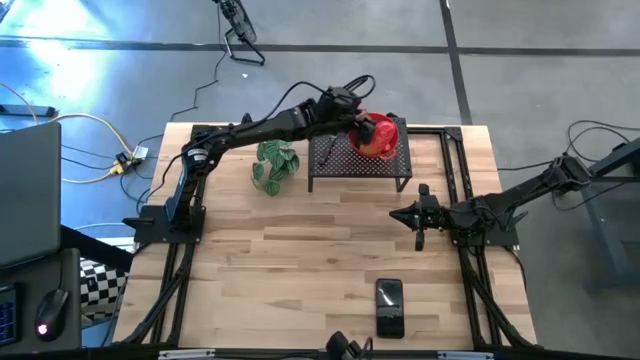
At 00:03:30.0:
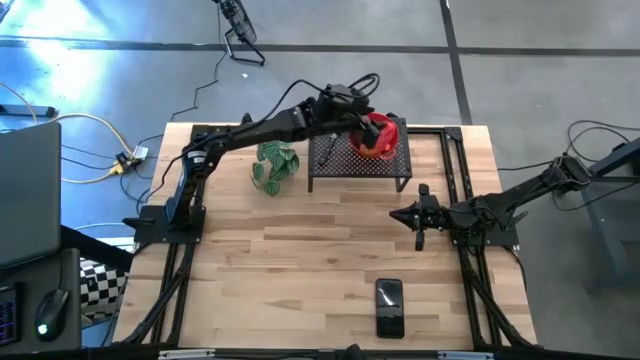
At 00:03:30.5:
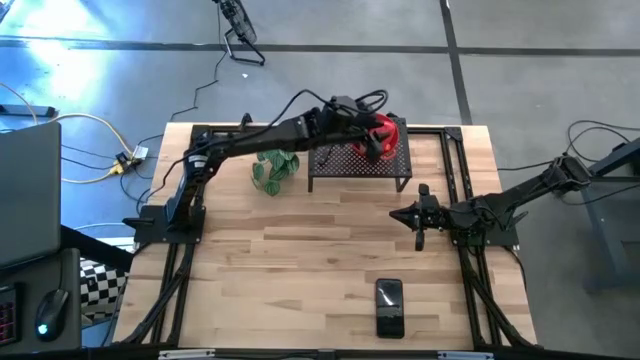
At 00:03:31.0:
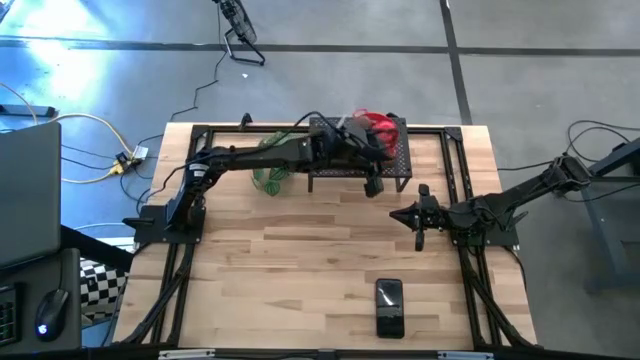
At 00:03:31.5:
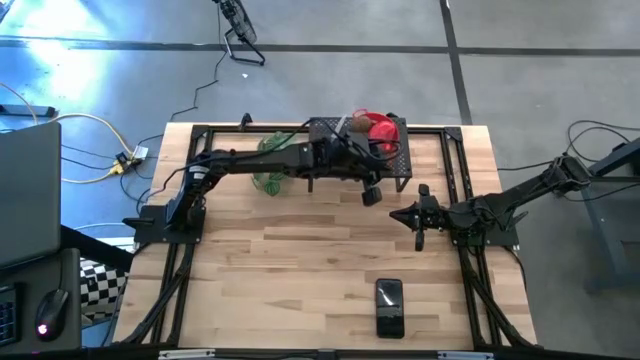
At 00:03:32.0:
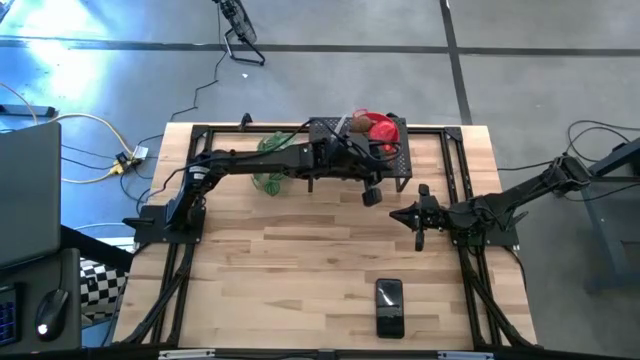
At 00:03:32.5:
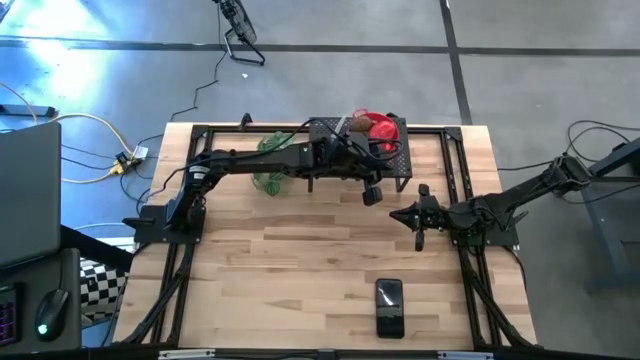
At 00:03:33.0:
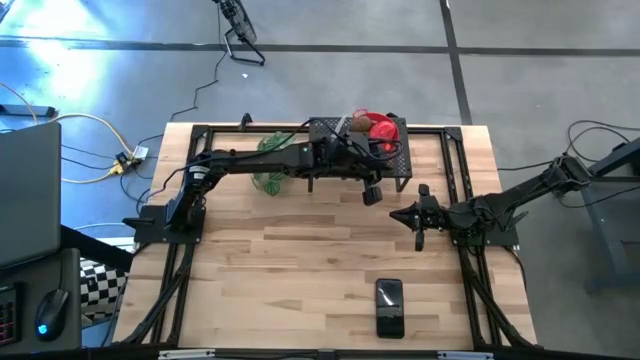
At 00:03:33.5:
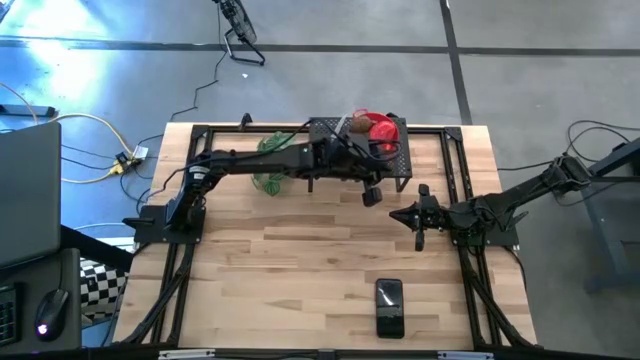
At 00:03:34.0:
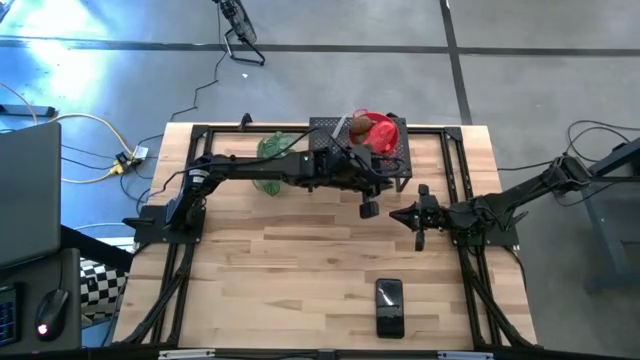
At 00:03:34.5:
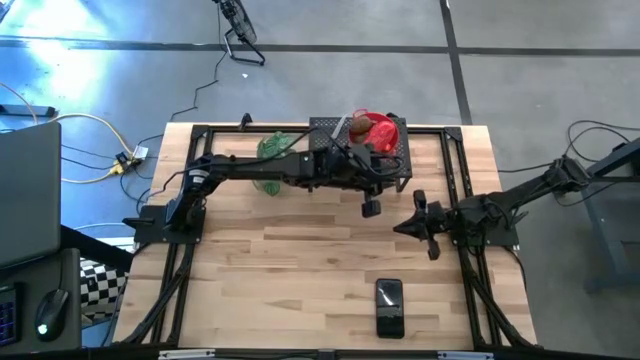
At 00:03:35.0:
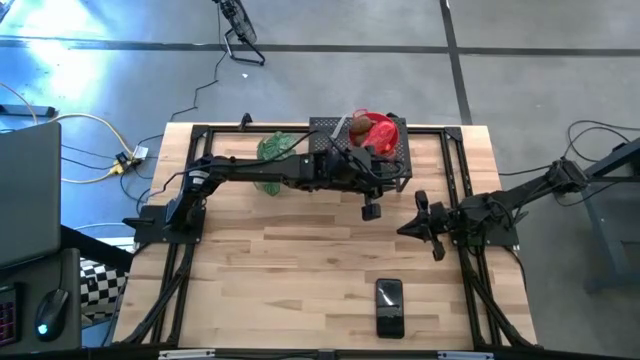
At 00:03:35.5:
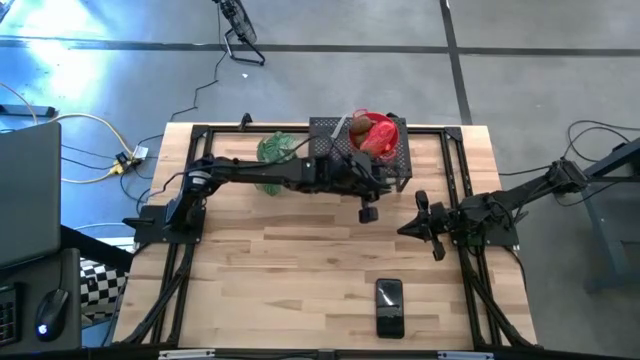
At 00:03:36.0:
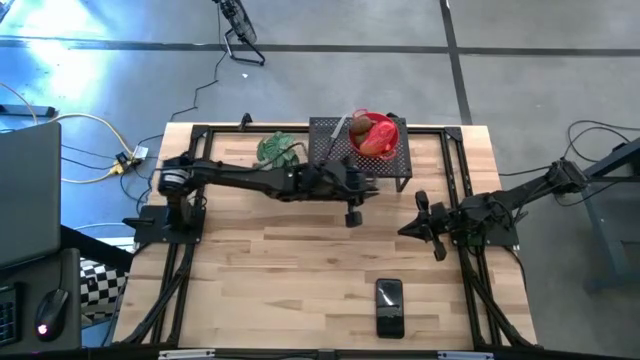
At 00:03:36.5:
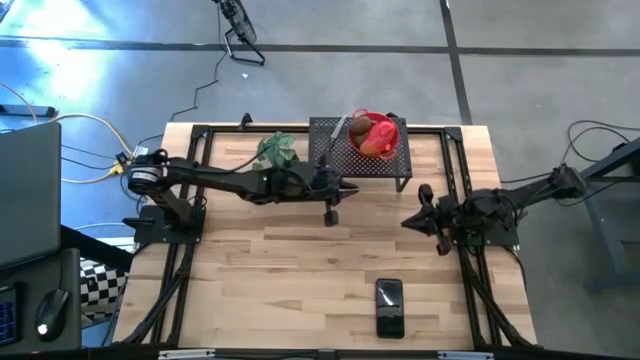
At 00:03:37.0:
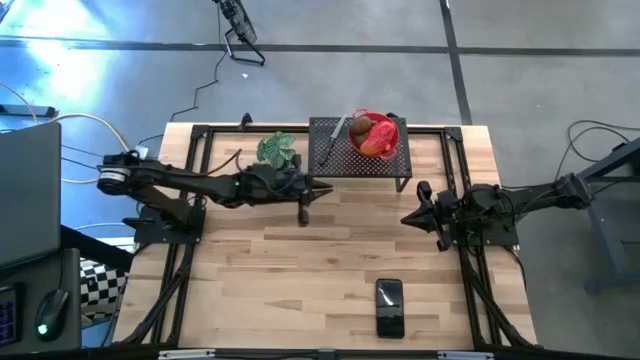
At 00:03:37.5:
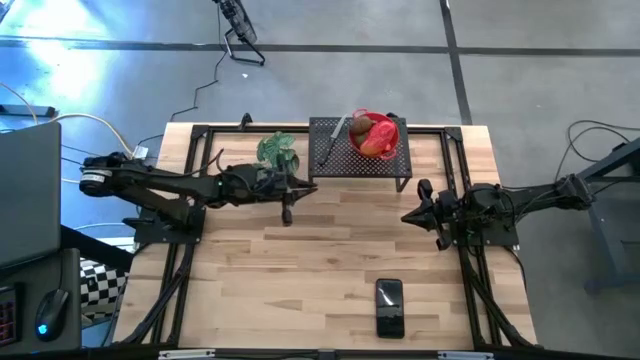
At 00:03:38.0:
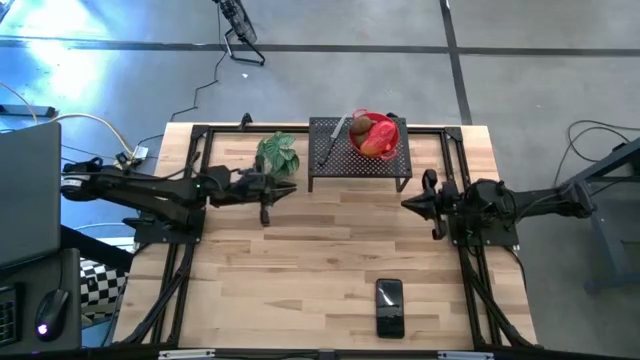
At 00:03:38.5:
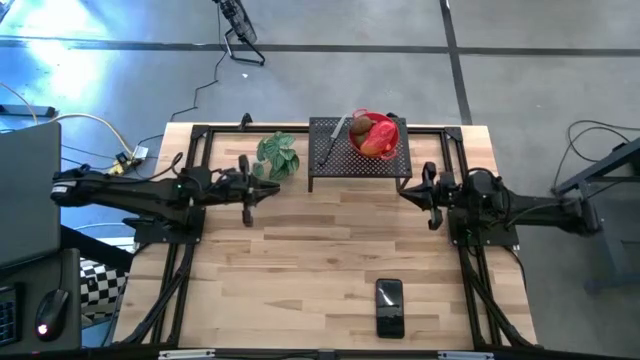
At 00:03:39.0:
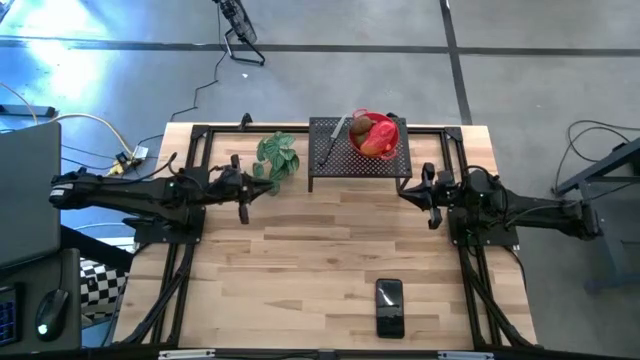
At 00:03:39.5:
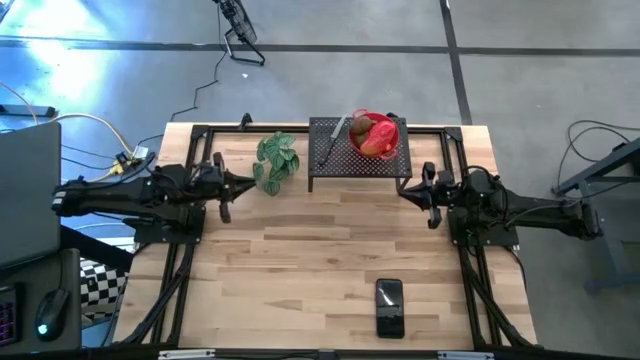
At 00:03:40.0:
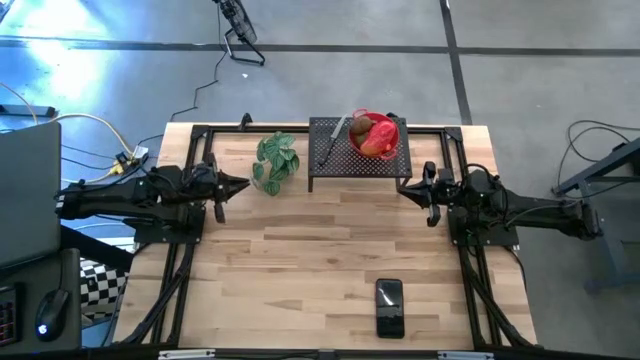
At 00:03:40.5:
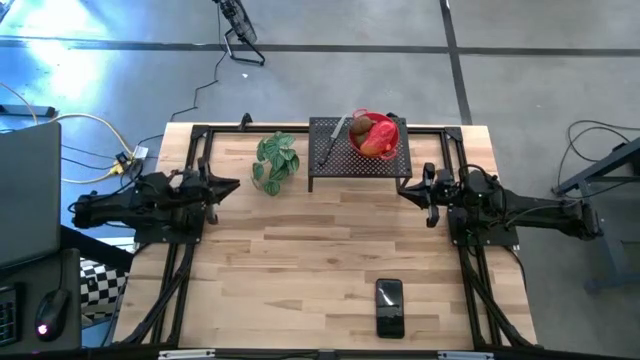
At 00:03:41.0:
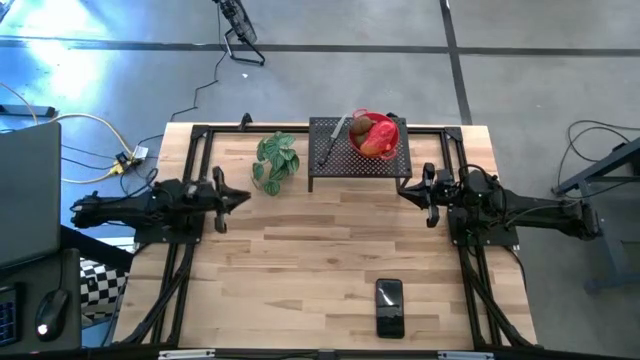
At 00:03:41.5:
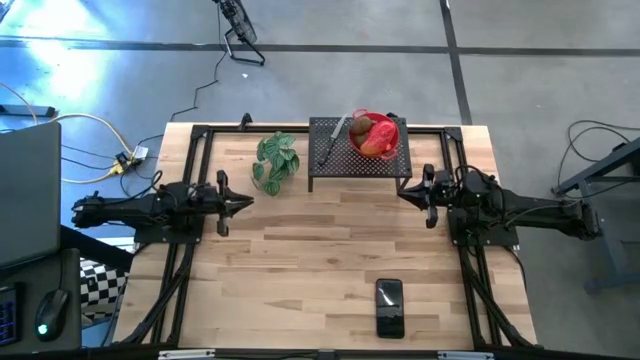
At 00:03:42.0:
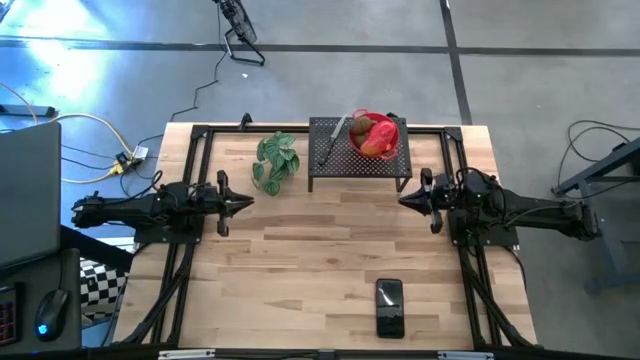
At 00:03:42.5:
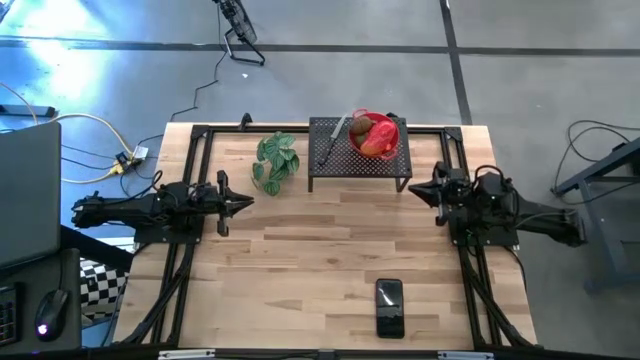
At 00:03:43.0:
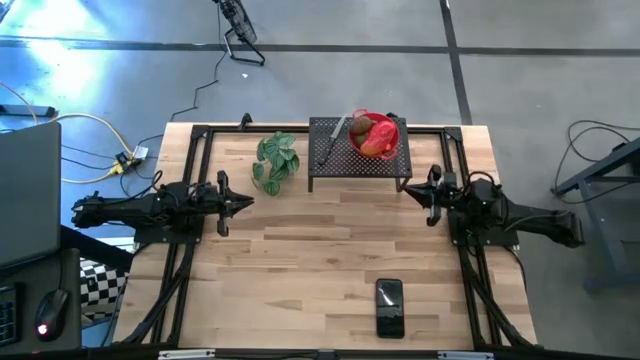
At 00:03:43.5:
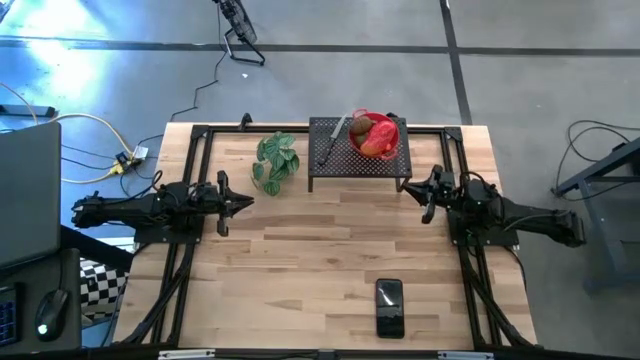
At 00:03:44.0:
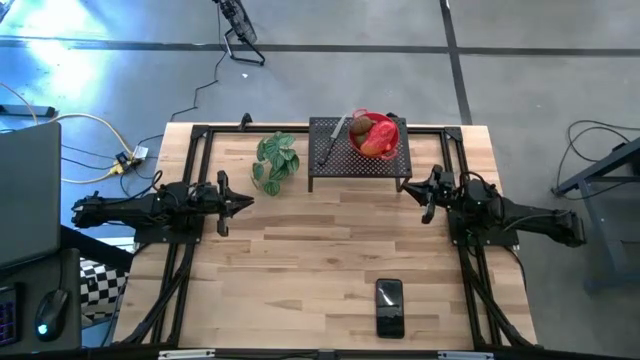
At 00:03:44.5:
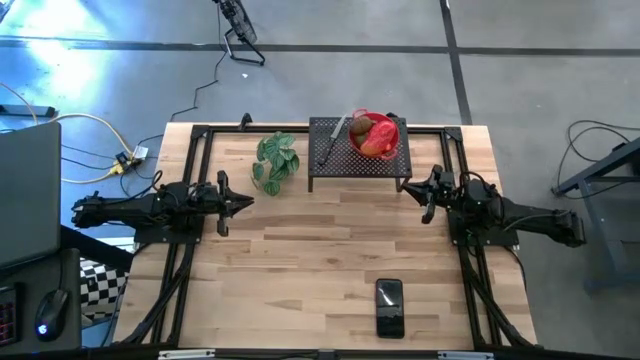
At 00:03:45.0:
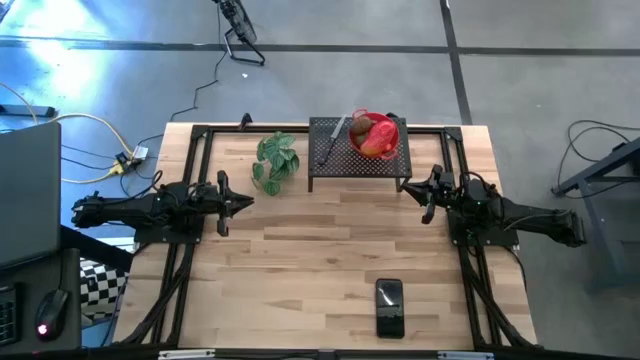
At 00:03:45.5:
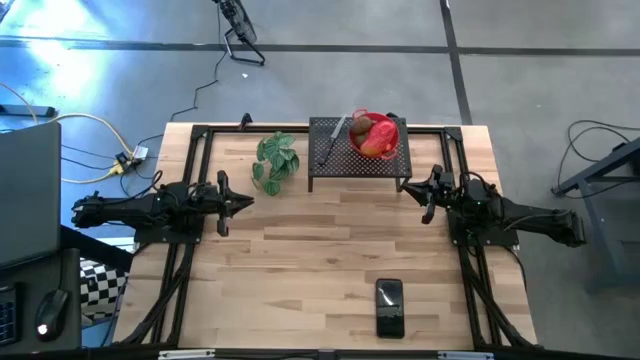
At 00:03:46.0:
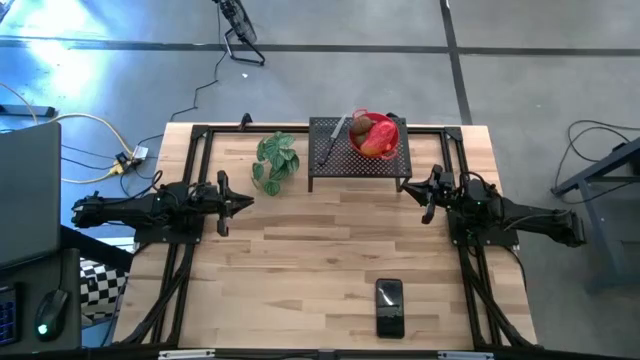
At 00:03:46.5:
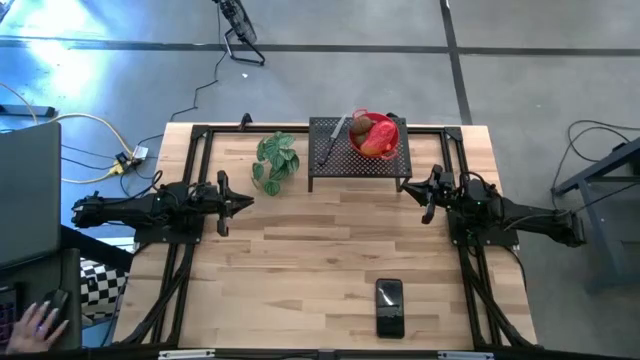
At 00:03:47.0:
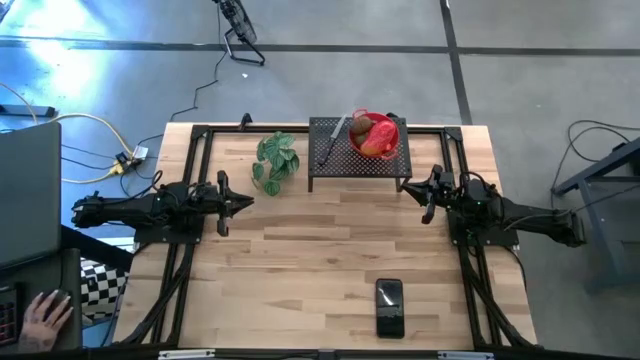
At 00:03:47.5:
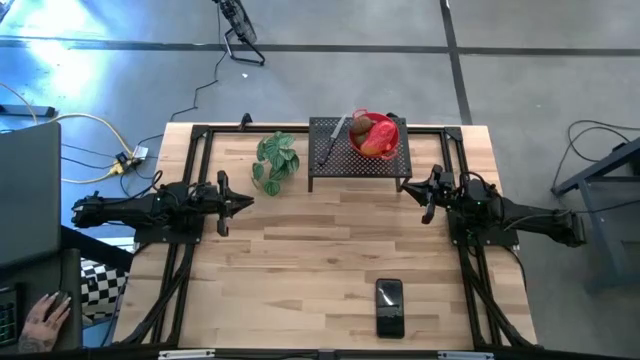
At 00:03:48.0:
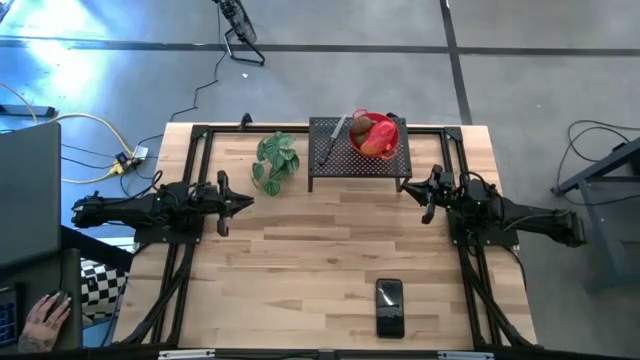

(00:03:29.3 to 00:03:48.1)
Task: Pick & Place Fruit
Return to Home Position
